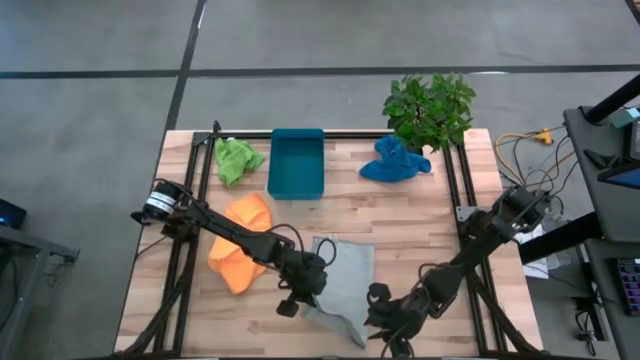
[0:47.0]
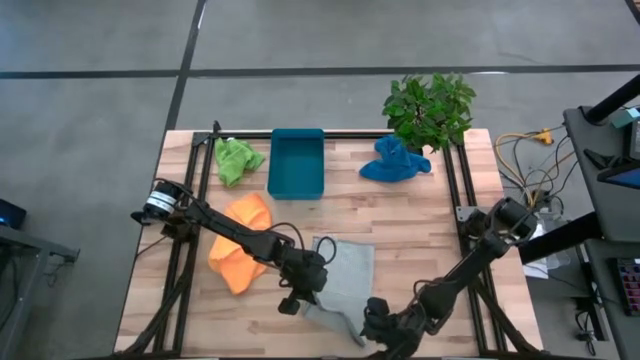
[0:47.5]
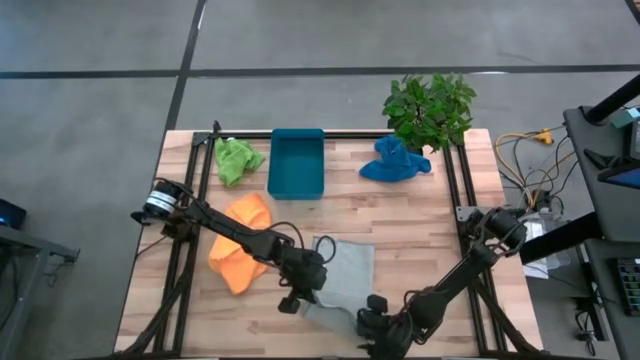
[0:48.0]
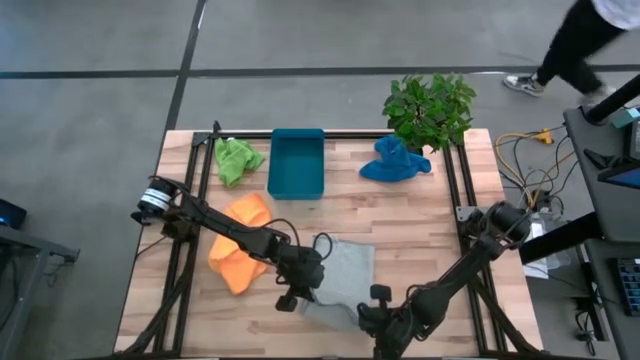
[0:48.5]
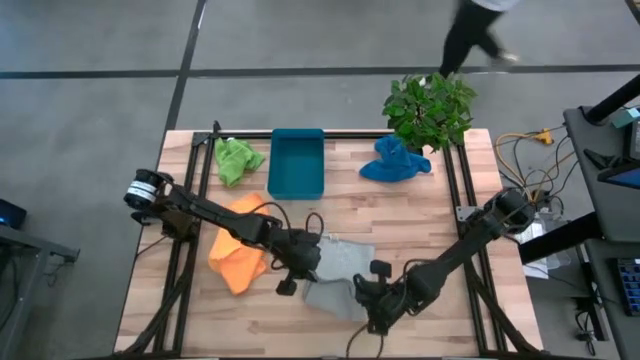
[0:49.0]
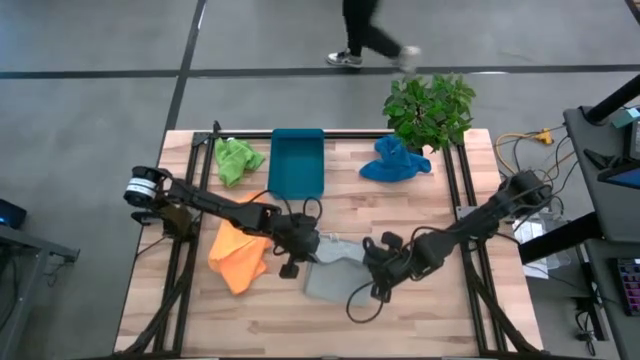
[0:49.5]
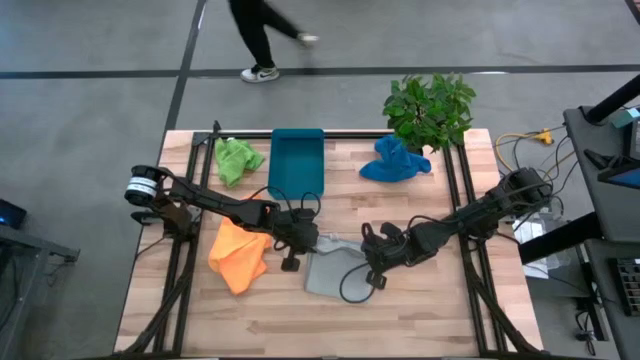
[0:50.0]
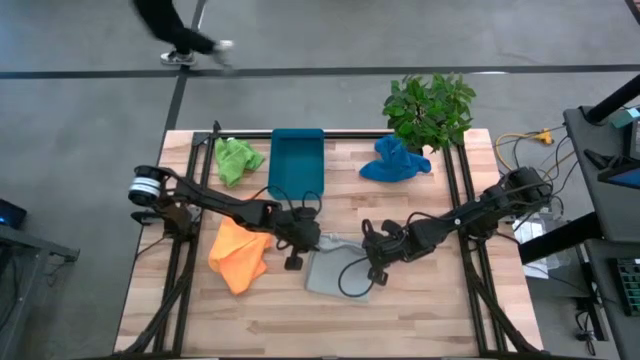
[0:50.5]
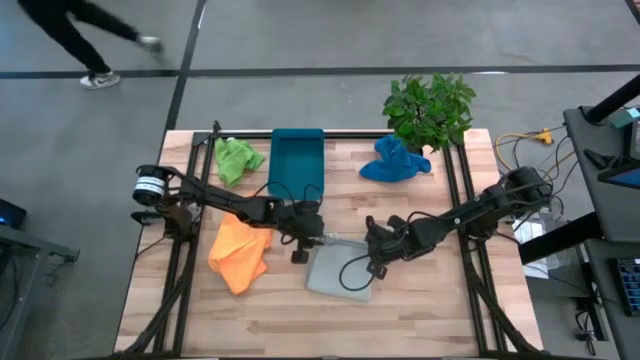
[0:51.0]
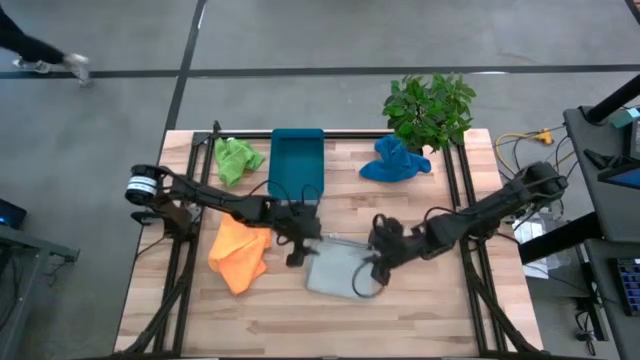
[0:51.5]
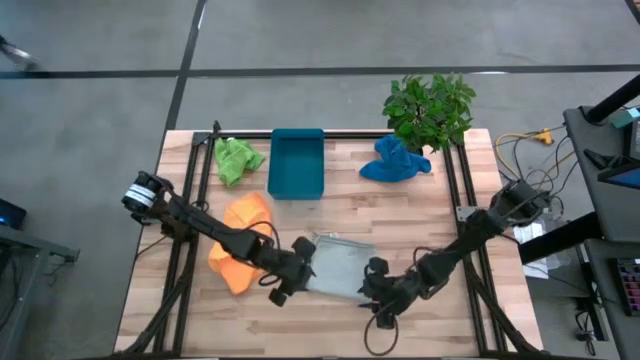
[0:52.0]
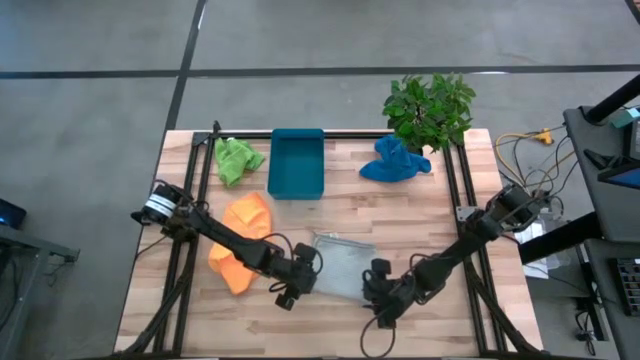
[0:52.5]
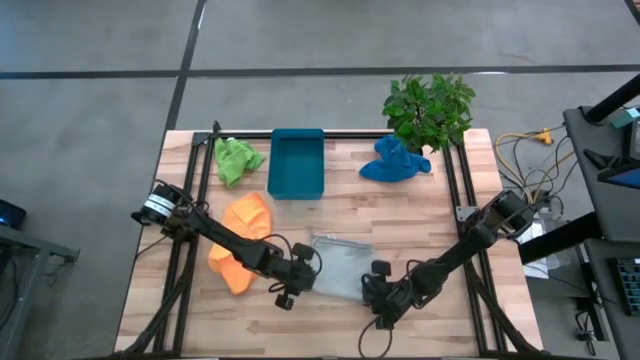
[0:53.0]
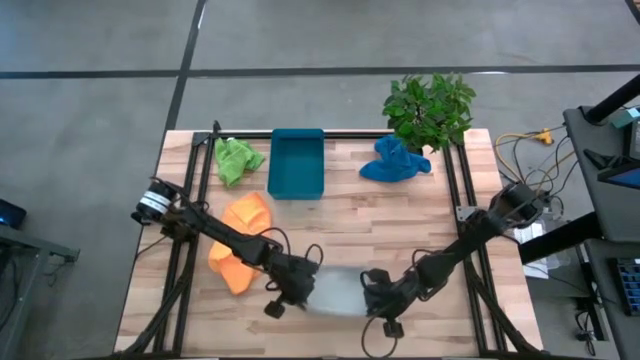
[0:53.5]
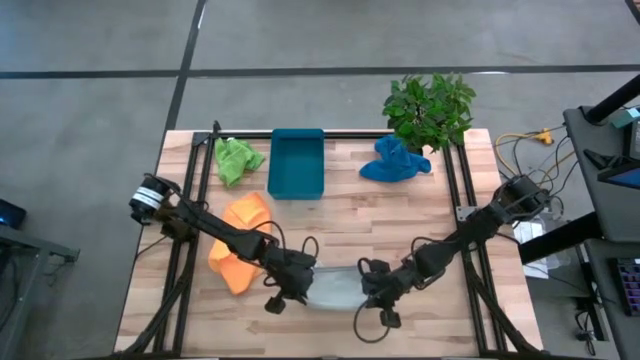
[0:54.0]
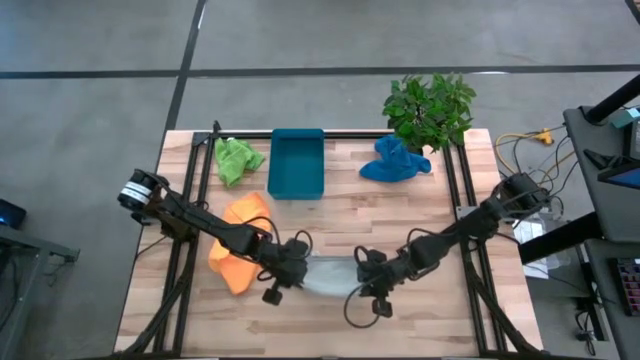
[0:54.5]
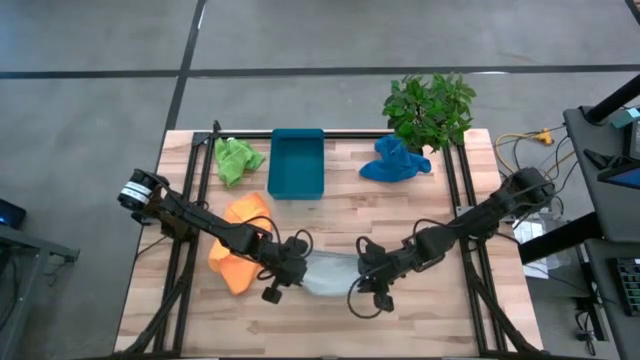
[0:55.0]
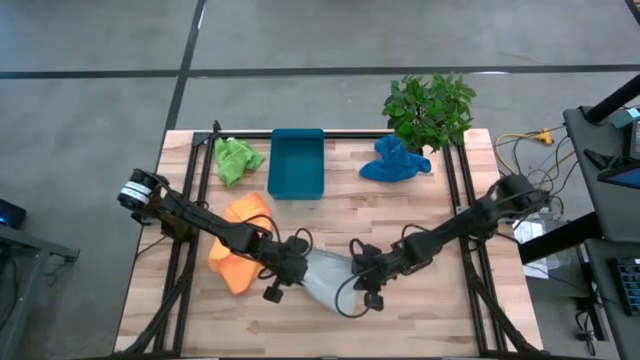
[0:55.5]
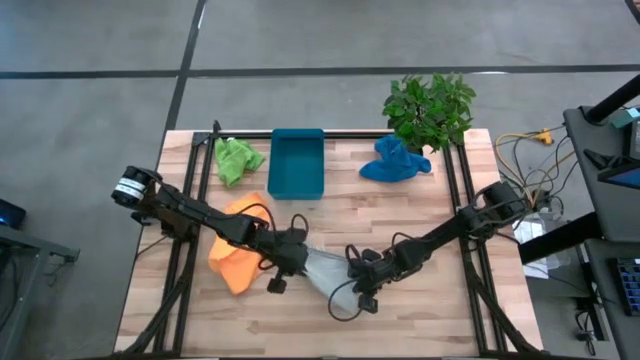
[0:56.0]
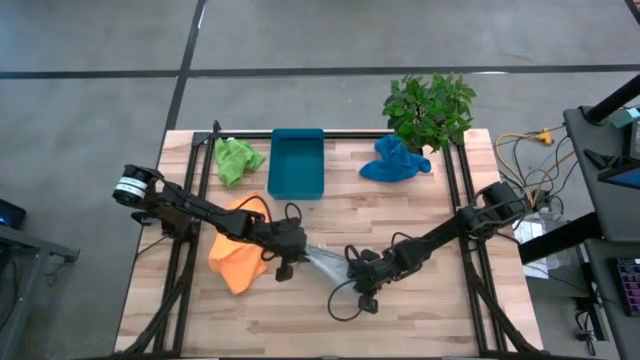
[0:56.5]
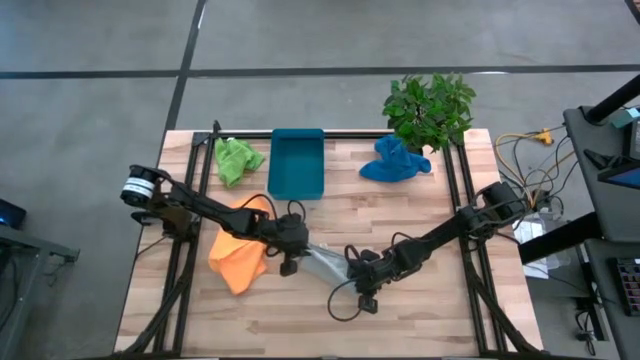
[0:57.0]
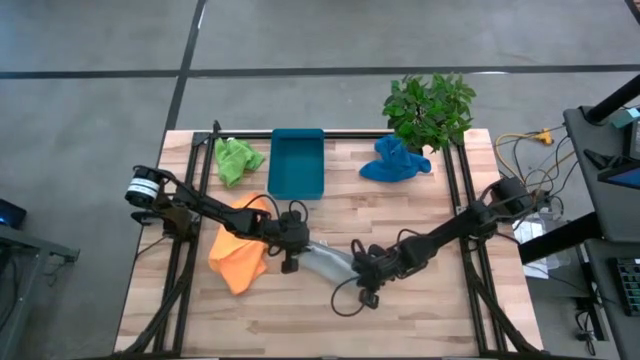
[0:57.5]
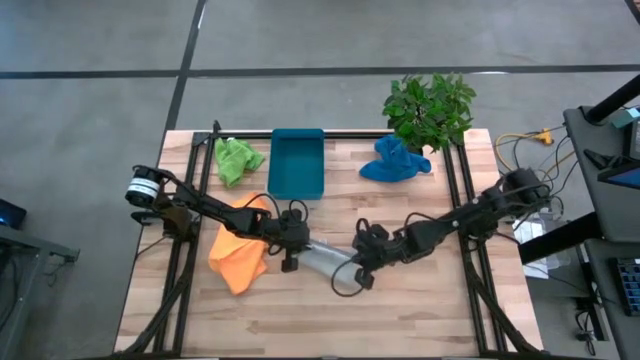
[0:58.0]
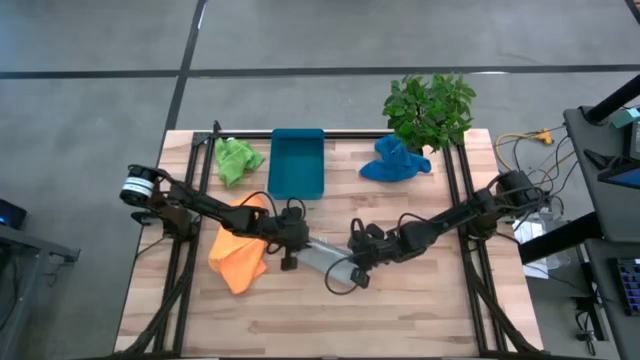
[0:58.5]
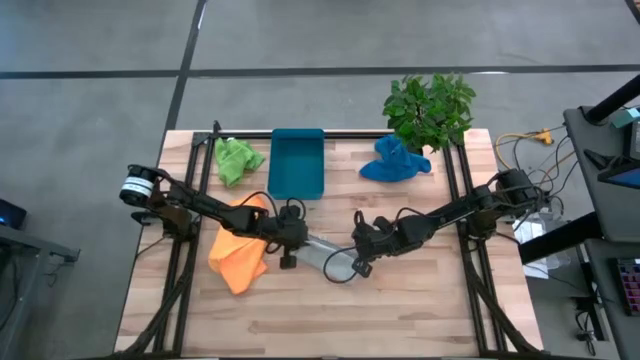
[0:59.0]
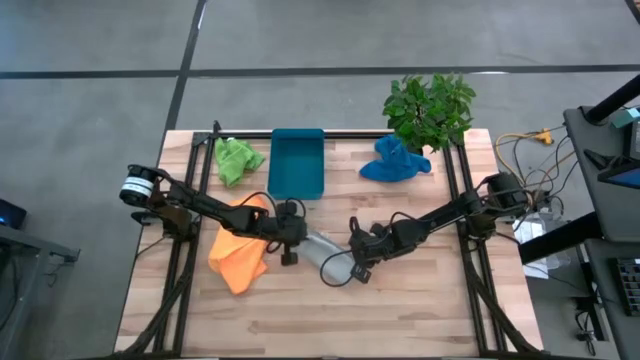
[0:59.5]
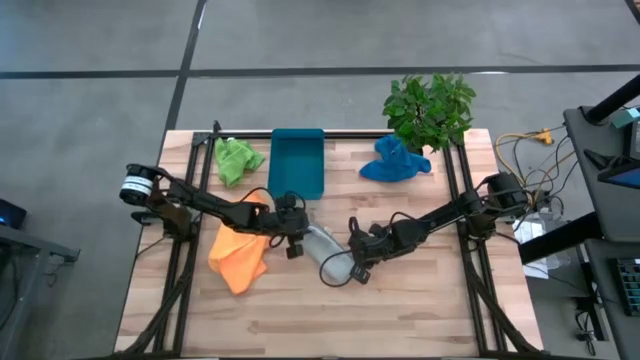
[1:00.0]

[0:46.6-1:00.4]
Task: Fold microfiber towels
Fold the grey microfiber cloth

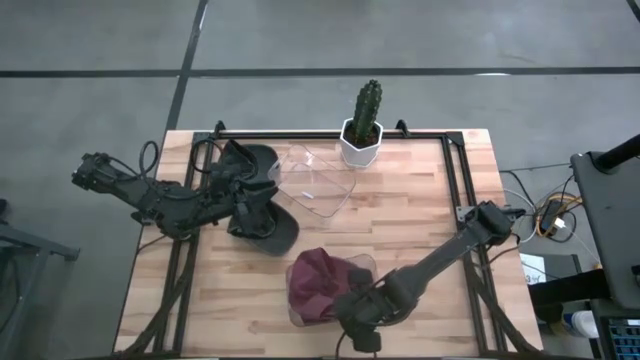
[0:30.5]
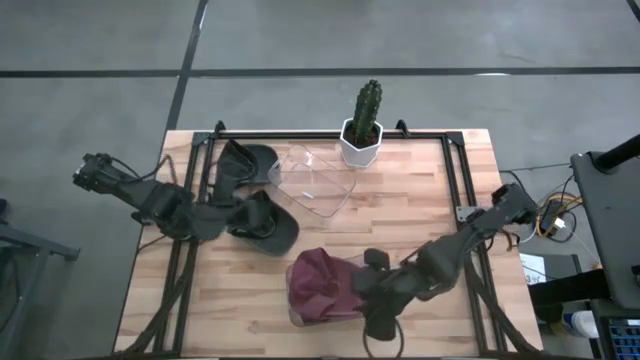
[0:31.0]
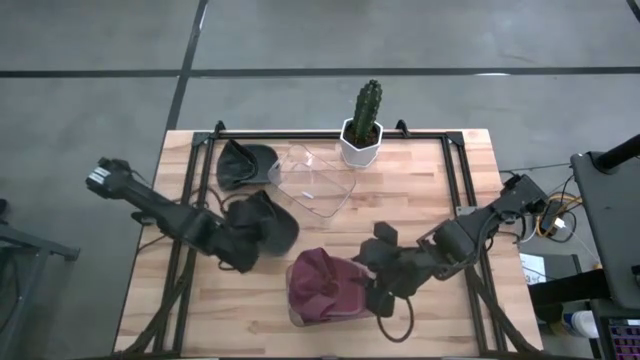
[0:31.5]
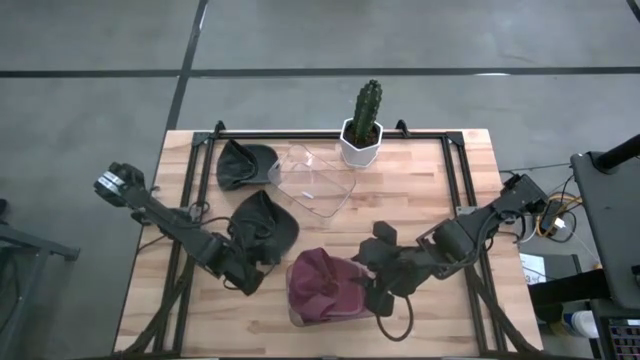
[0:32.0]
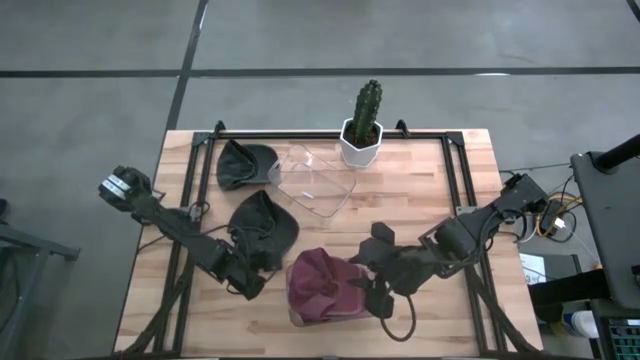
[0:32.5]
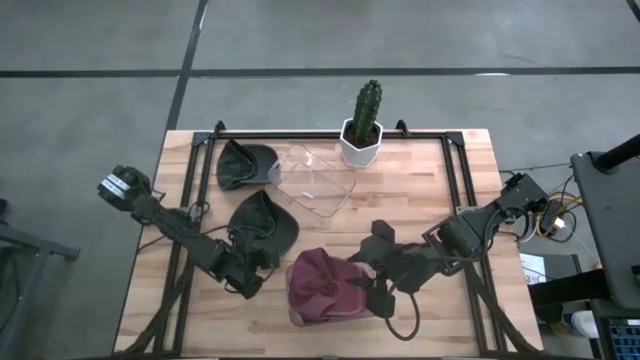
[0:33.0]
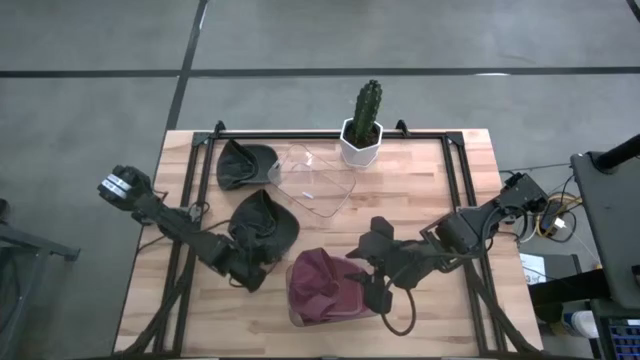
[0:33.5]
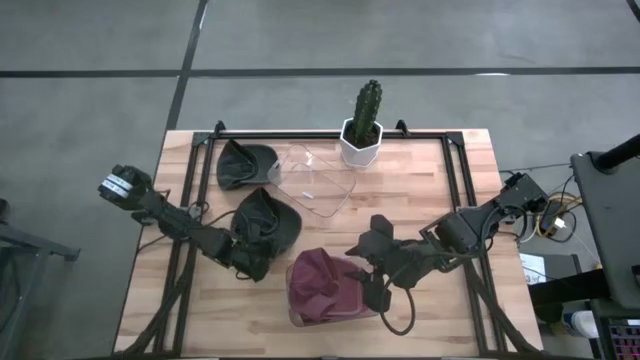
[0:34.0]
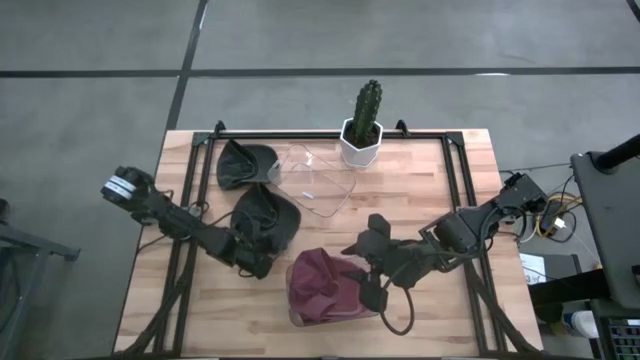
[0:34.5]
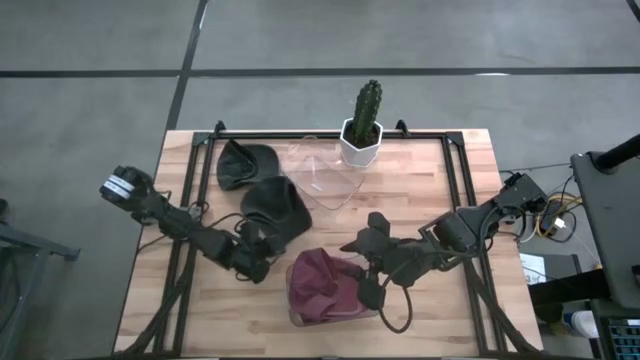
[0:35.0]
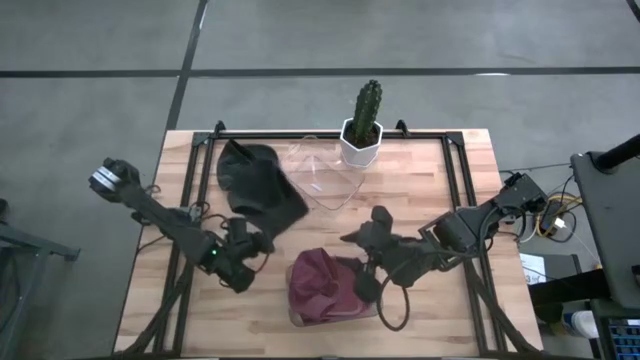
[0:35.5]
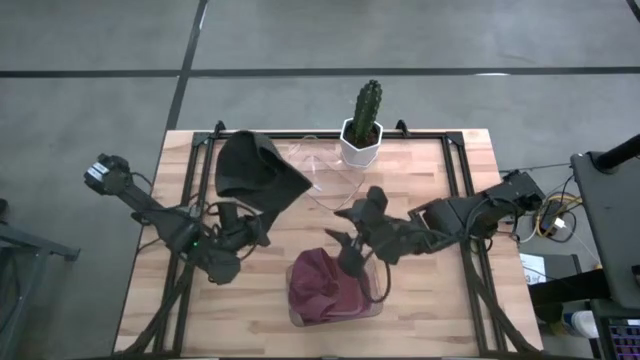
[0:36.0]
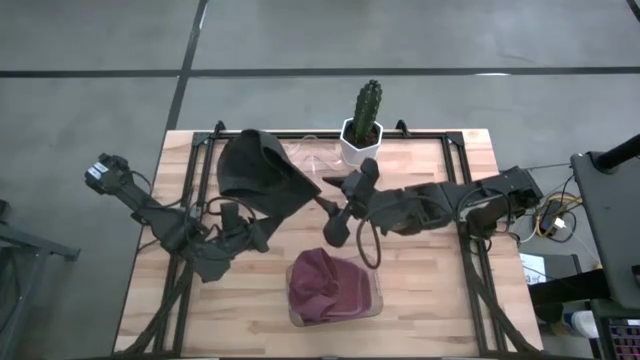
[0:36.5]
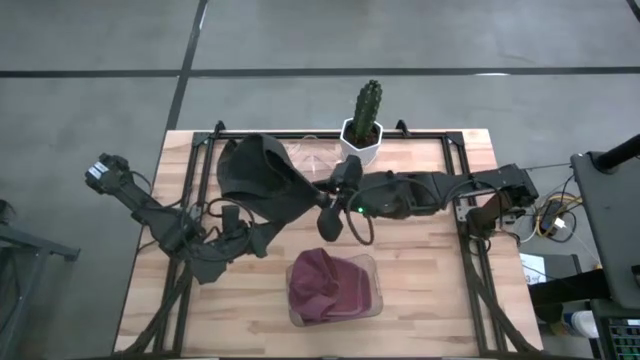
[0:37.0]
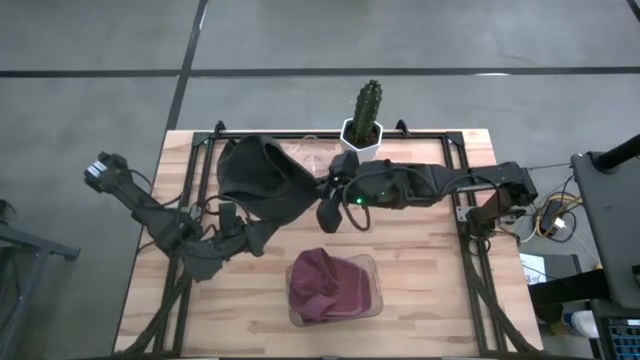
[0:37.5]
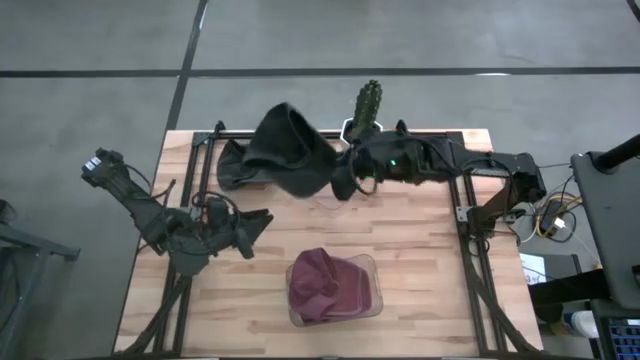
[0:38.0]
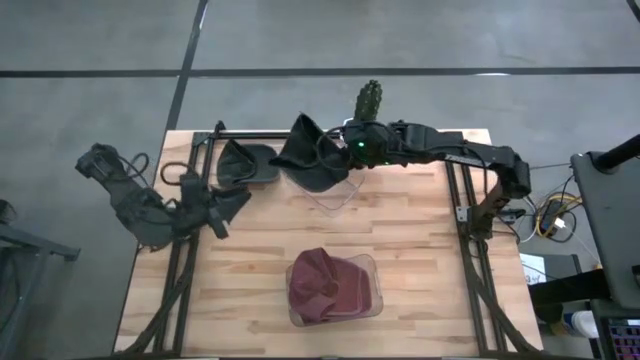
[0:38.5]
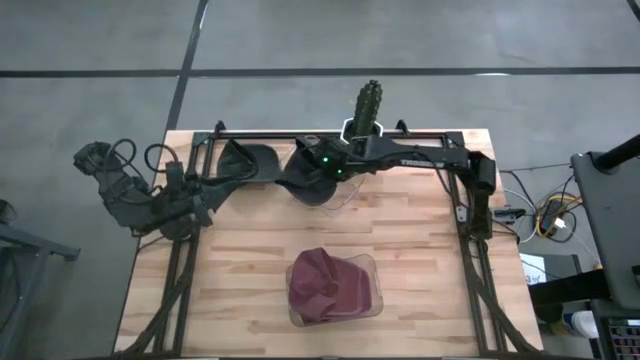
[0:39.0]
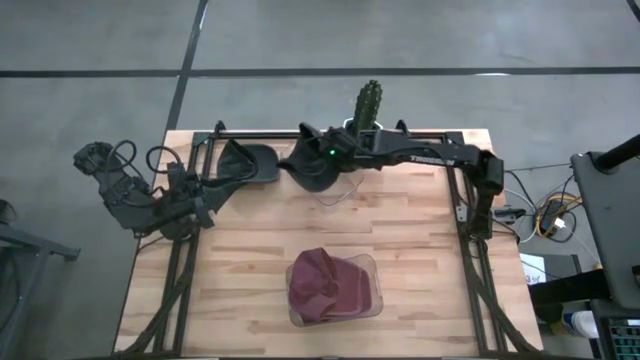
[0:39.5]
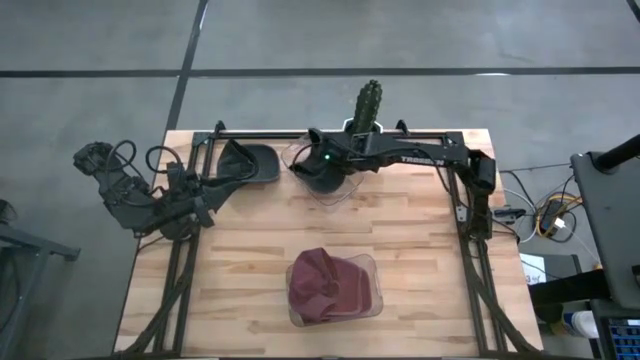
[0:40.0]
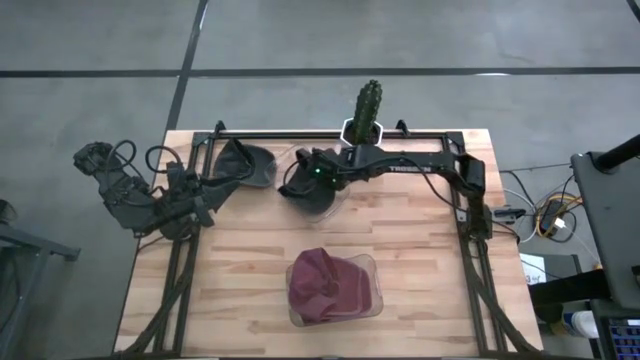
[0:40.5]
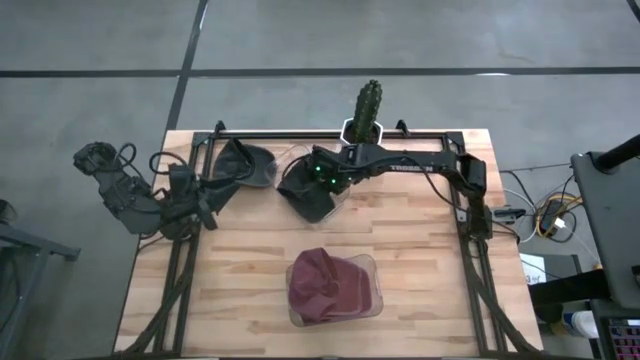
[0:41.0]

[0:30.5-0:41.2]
Task: Pick & Place hat
Put the bottom black cap into the top transparent bin
